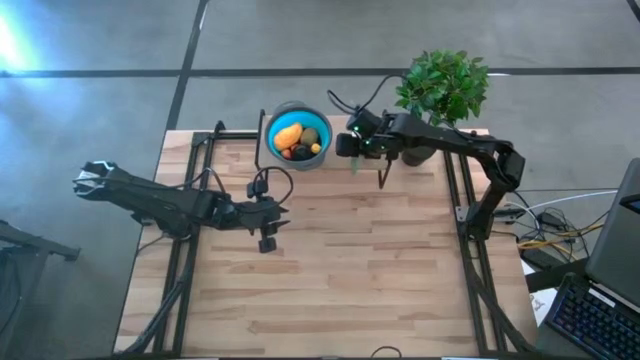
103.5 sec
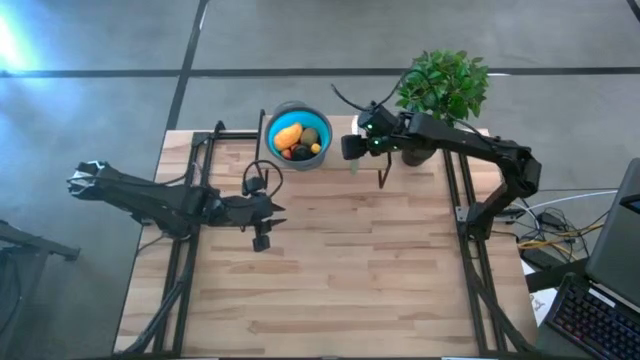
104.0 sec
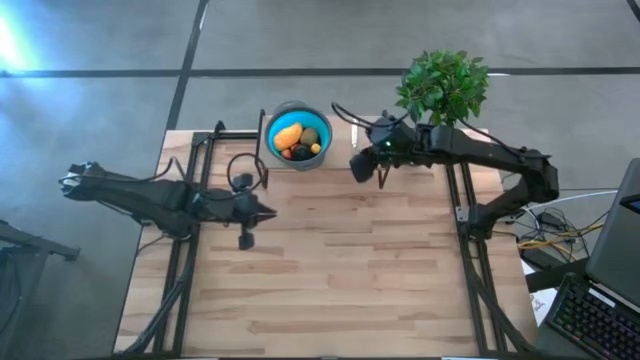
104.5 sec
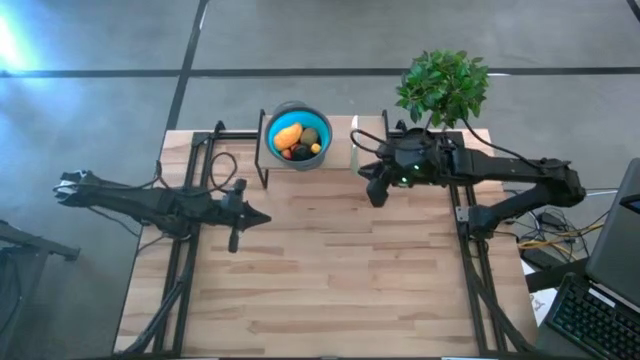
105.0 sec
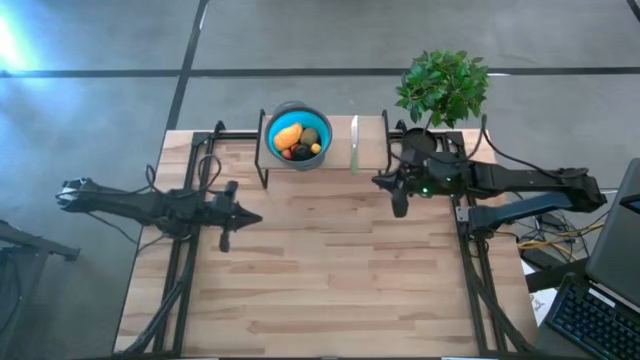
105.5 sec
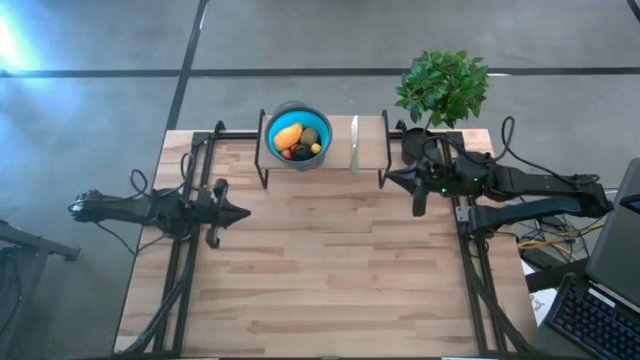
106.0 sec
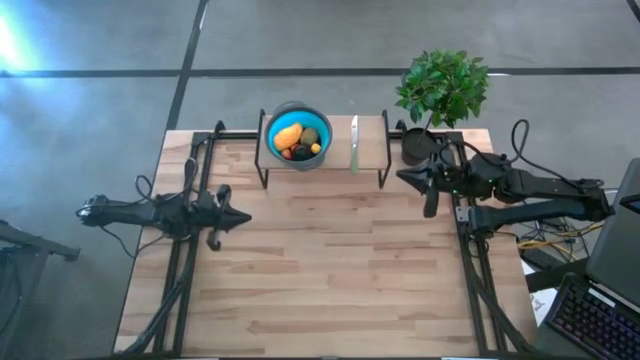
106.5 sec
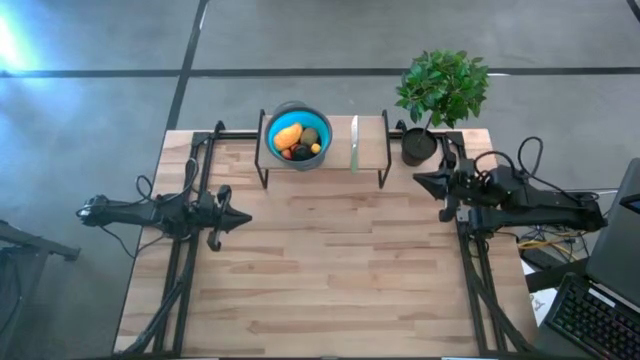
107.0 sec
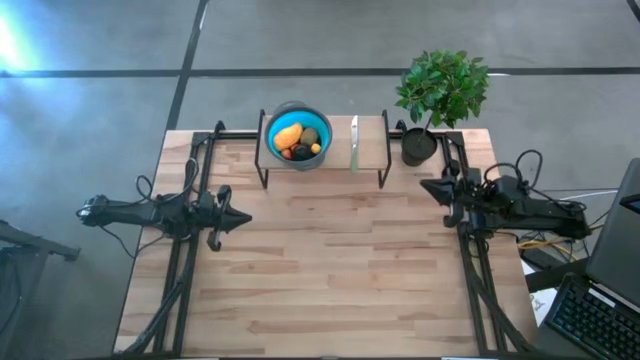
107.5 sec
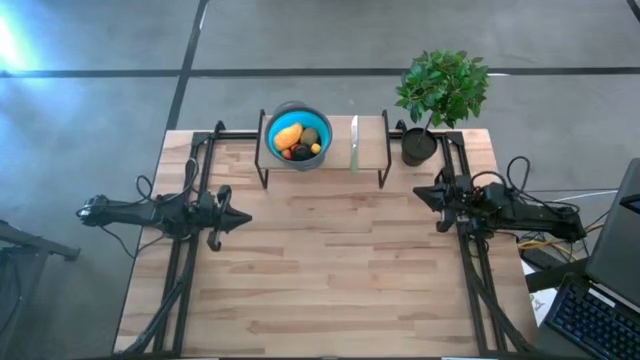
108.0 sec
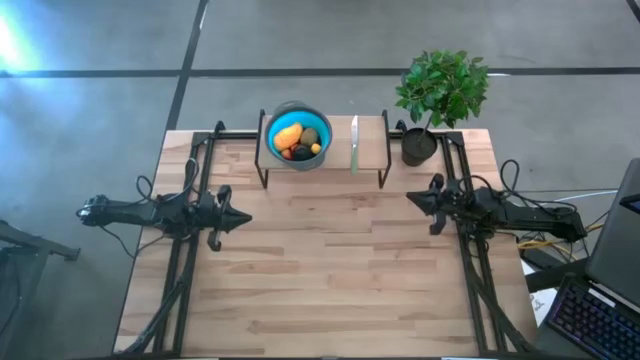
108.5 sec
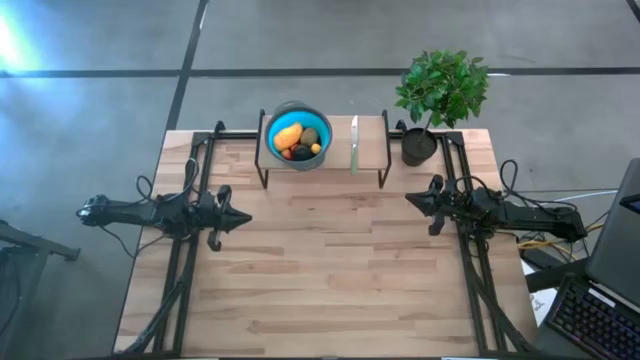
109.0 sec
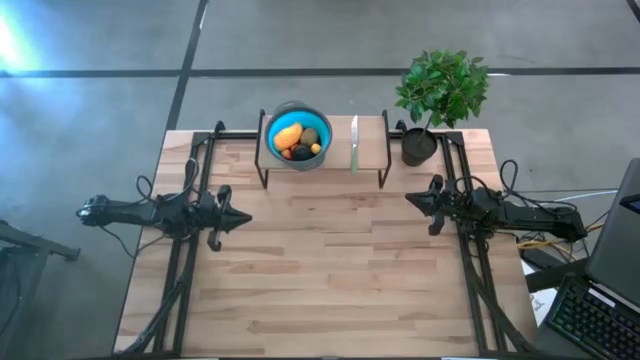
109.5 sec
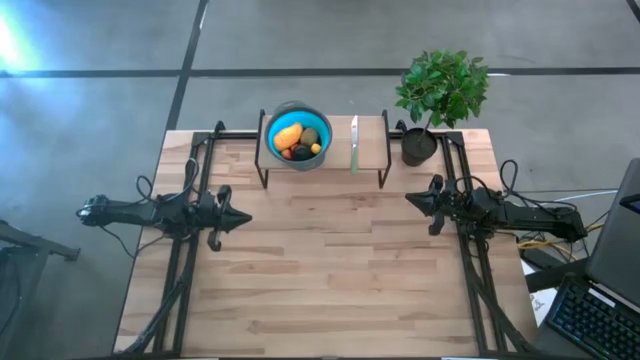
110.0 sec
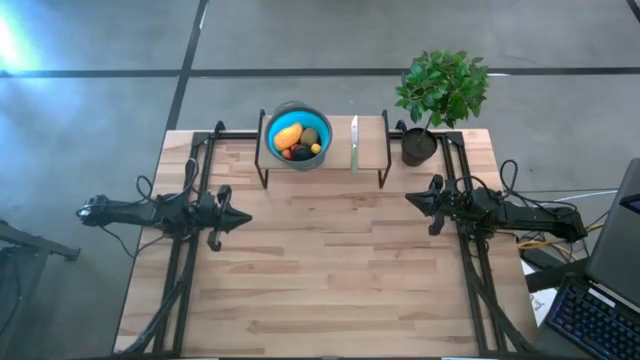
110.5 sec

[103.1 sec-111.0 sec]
Task: Pick & Place Fruit
Return to Home Position

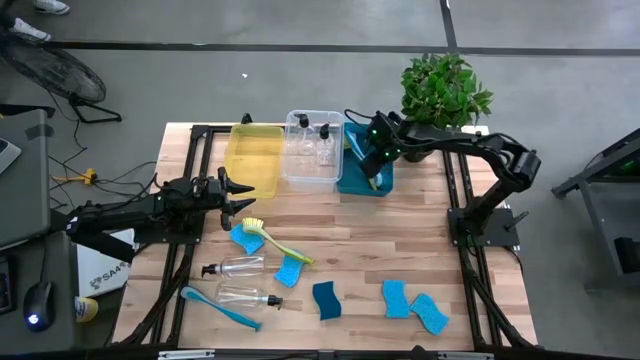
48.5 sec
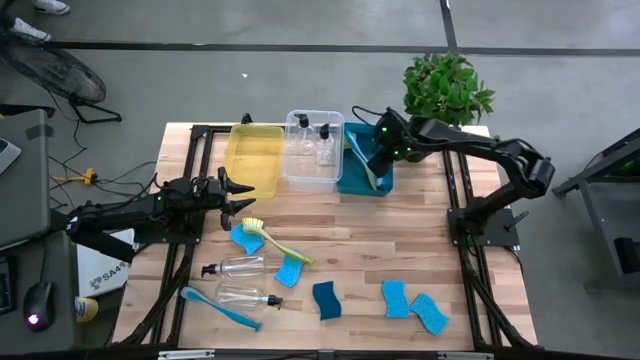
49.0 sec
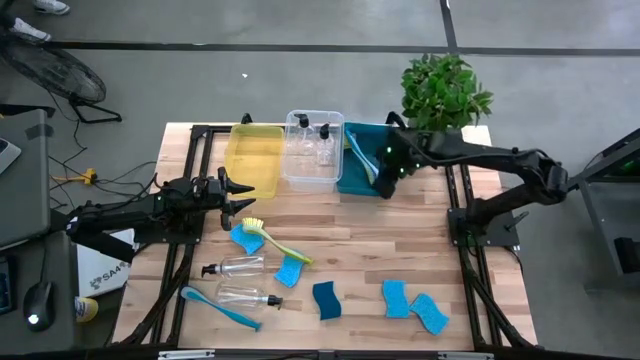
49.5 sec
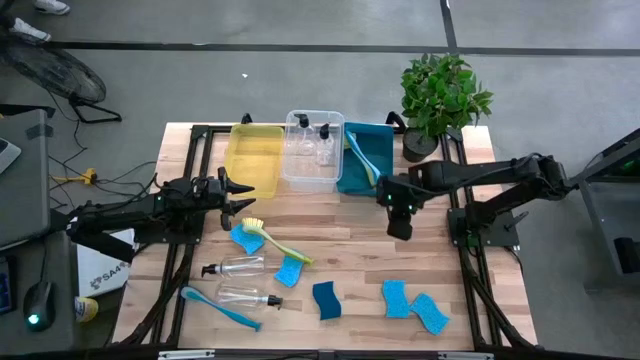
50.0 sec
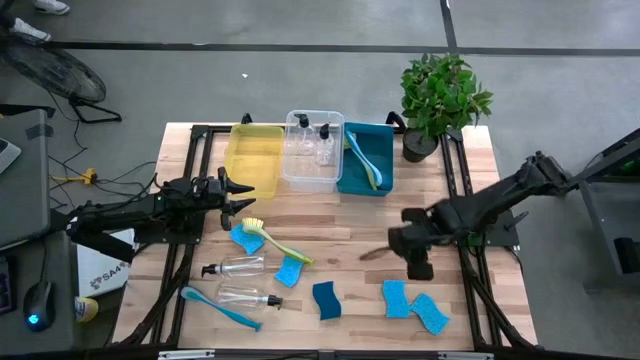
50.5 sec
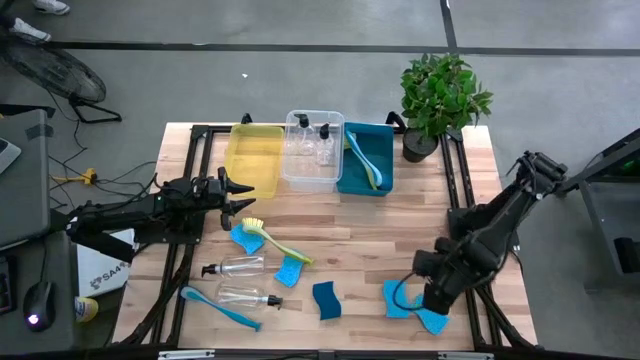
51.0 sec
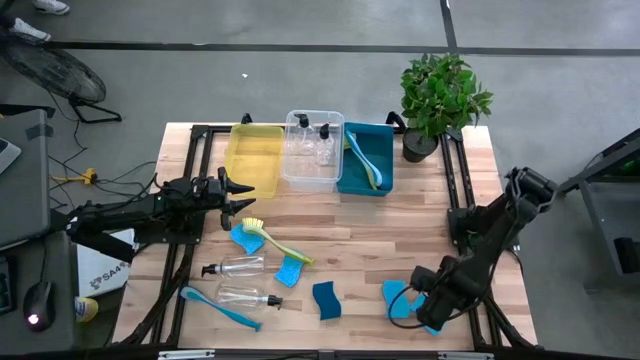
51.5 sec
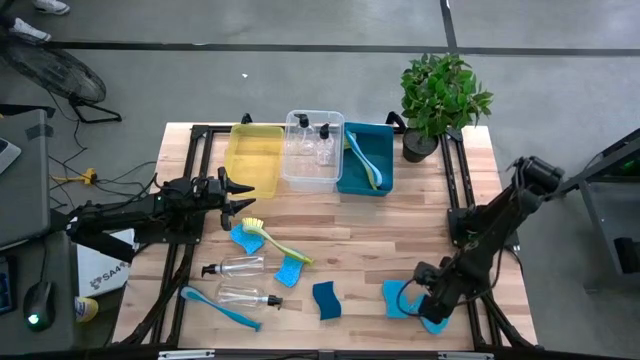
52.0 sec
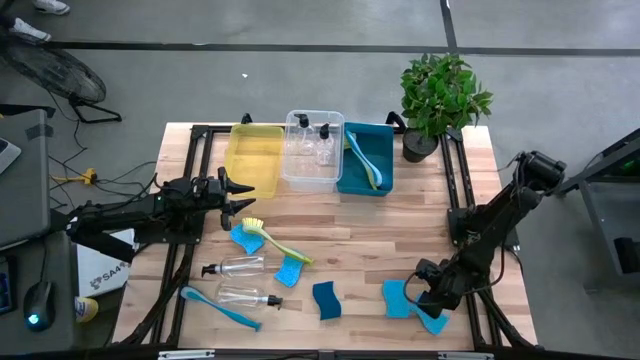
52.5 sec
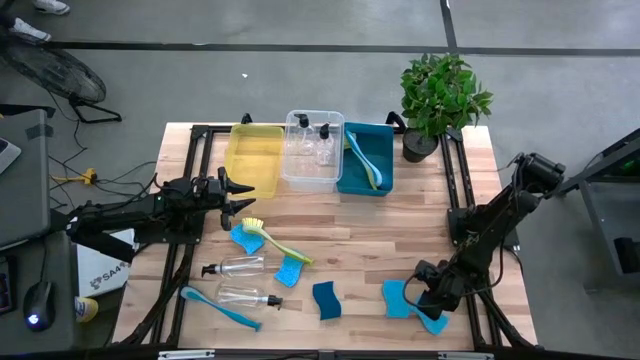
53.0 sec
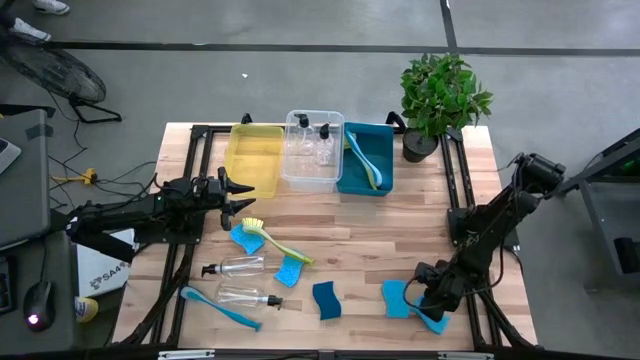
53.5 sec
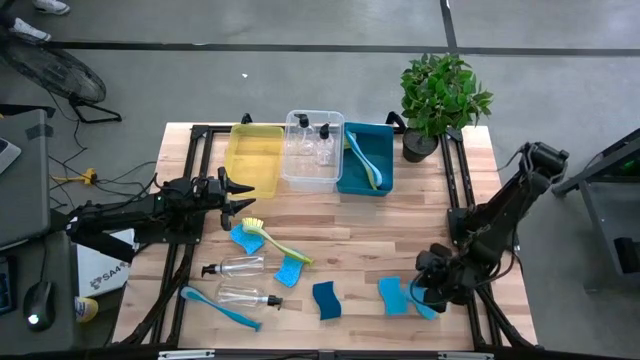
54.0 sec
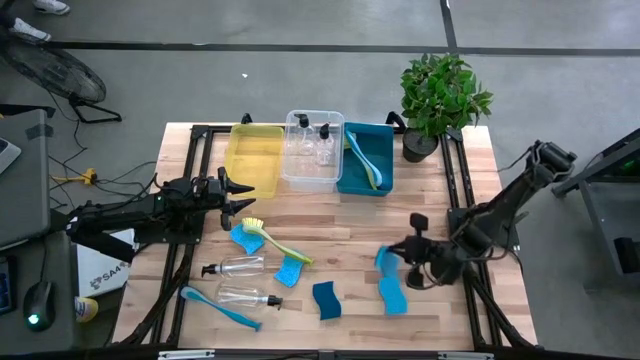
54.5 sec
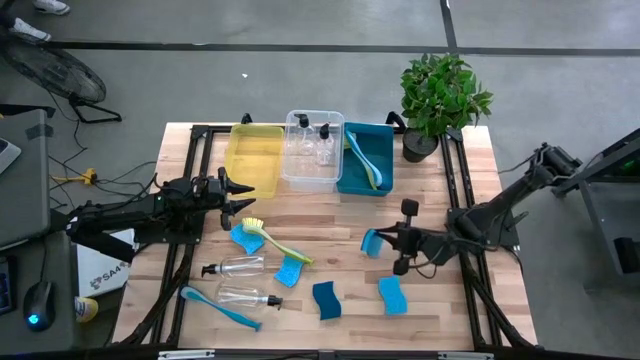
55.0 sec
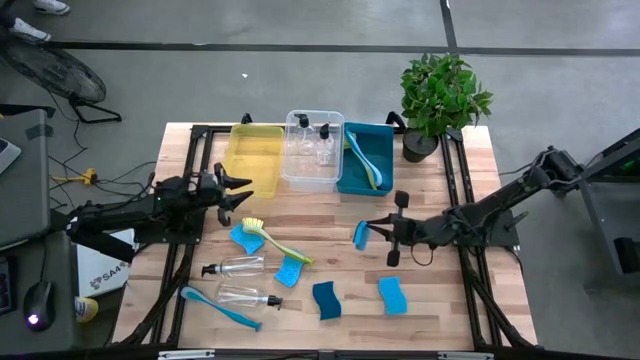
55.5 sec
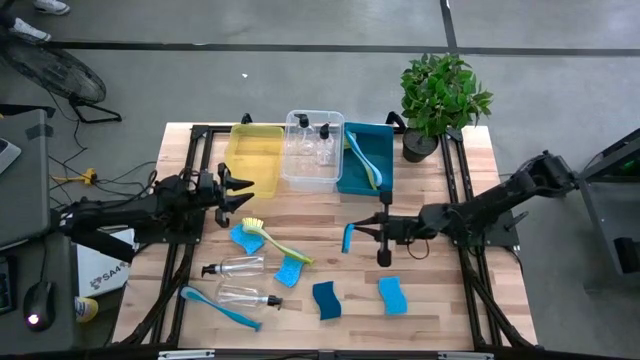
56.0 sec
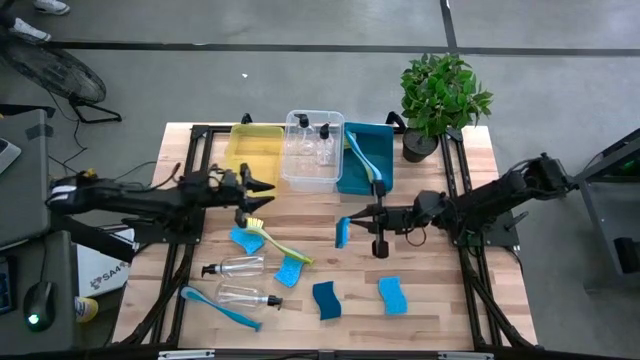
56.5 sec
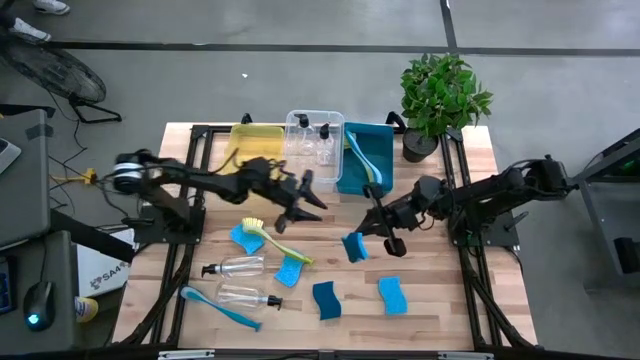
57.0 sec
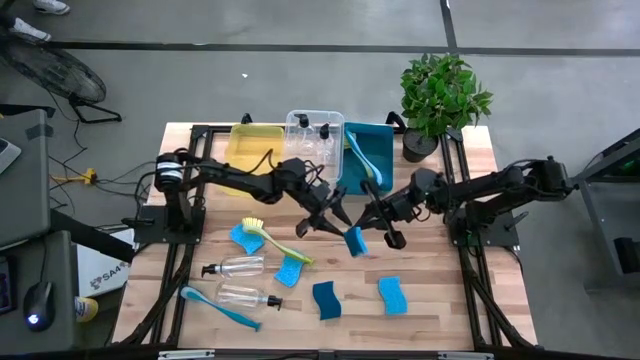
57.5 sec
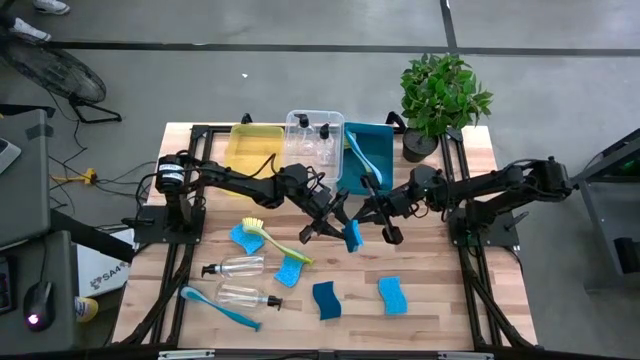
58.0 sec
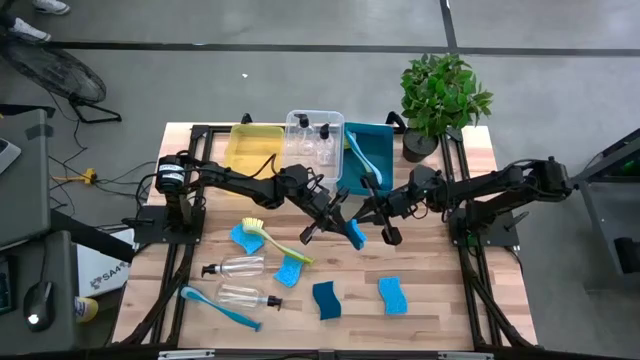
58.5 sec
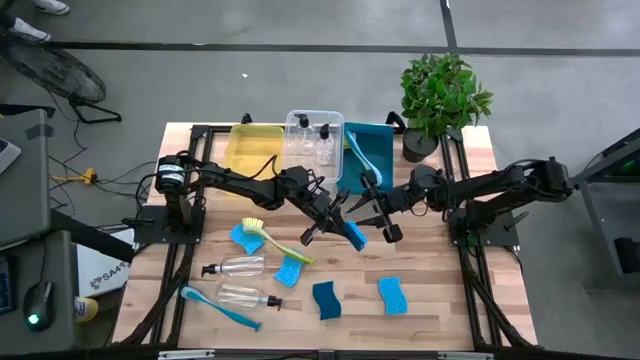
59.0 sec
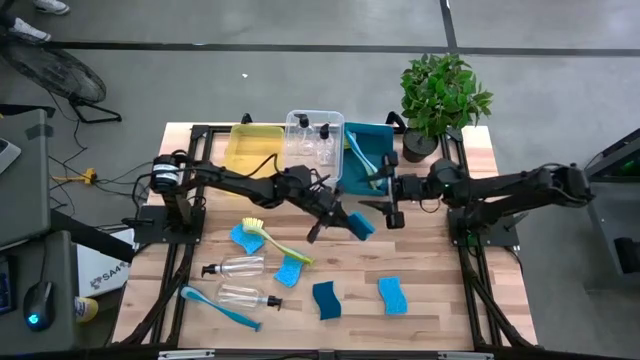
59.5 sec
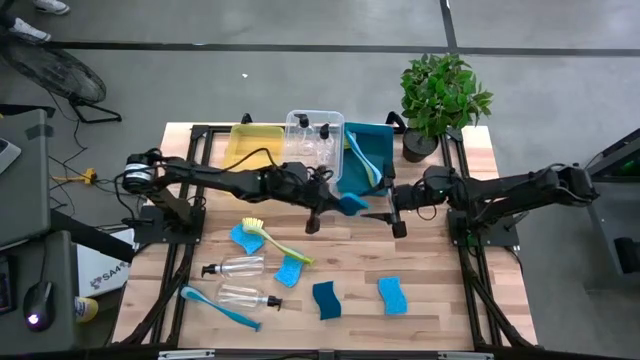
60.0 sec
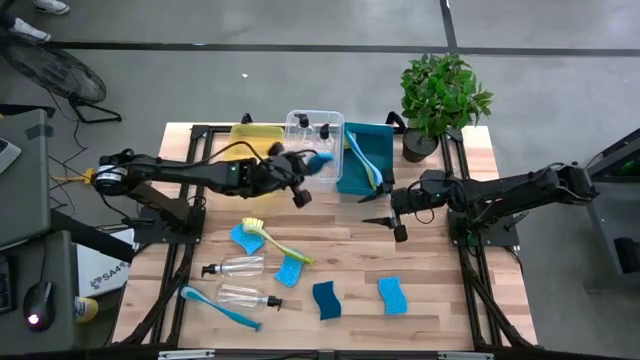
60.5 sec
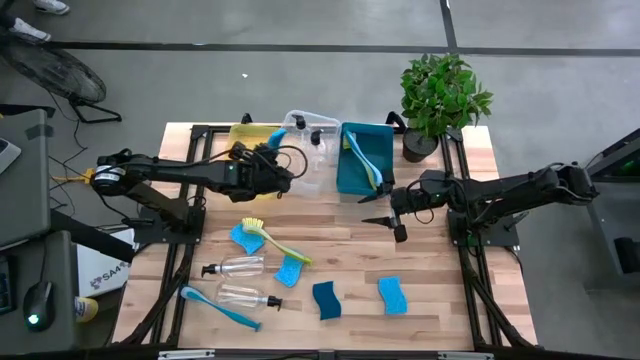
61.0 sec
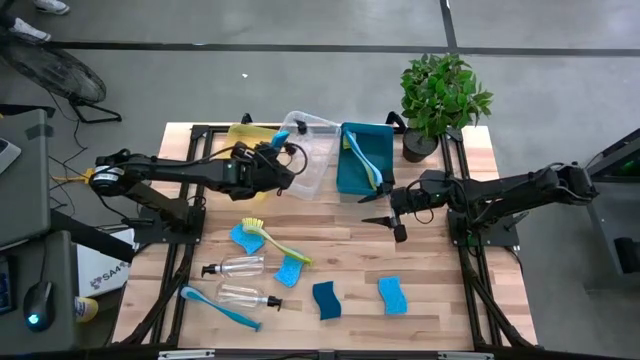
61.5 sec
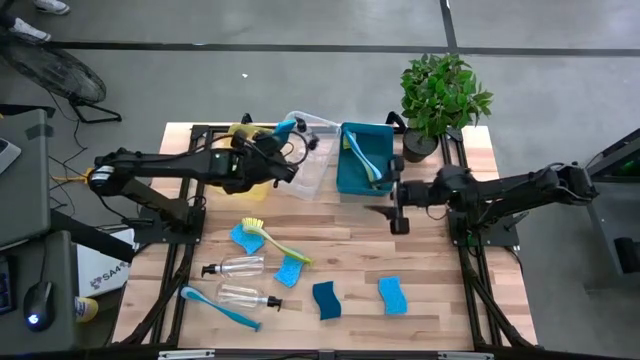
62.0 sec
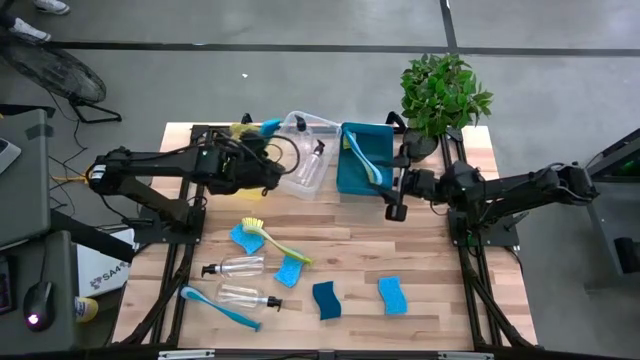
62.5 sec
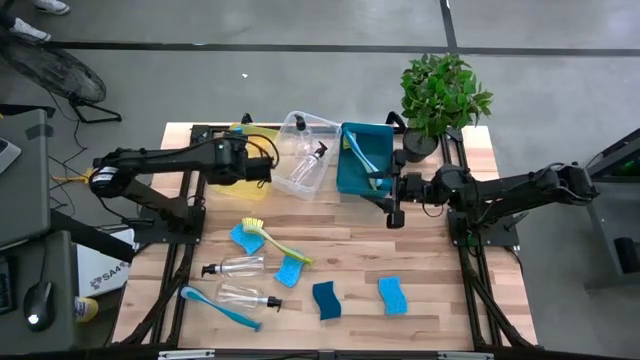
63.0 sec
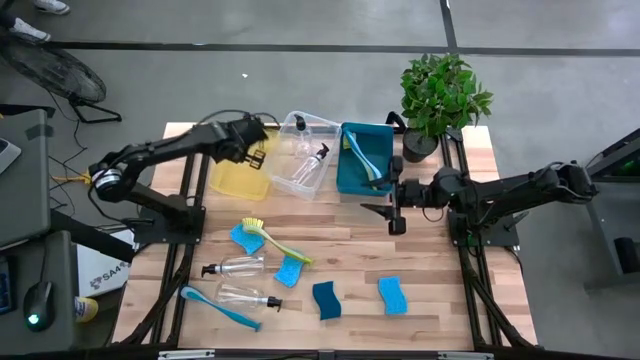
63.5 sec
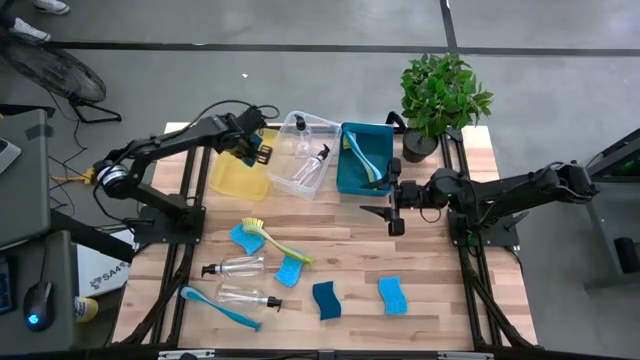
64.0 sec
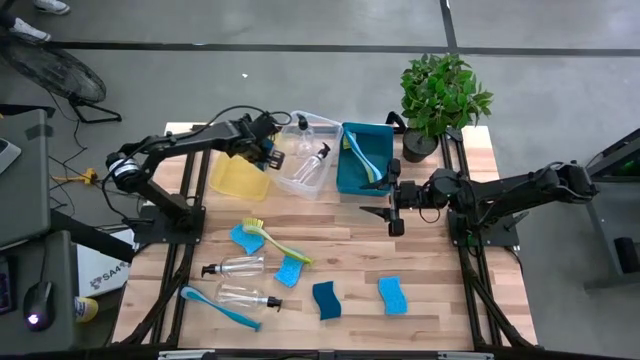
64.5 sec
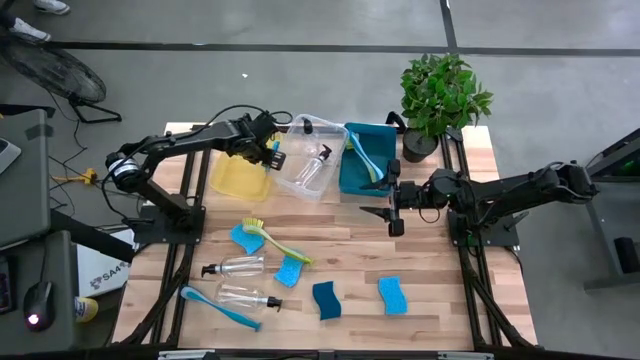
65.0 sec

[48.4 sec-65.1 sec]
Task: Pick & Place Kitchen Sink Supplies
Put the blue sponge into the yellow bin
